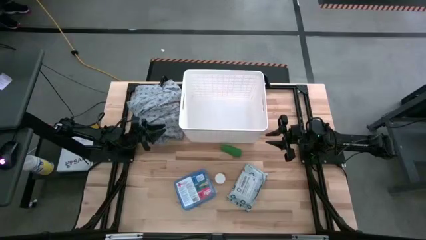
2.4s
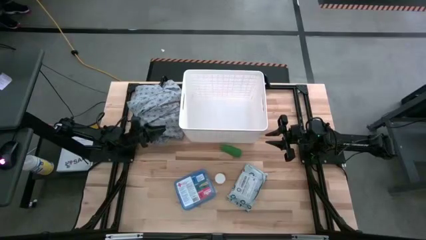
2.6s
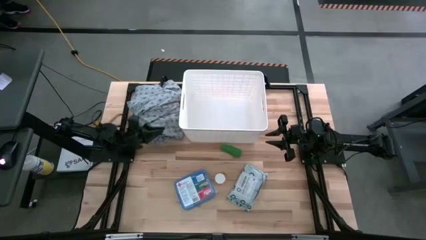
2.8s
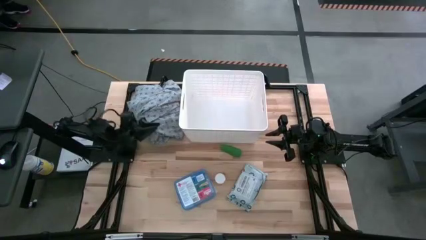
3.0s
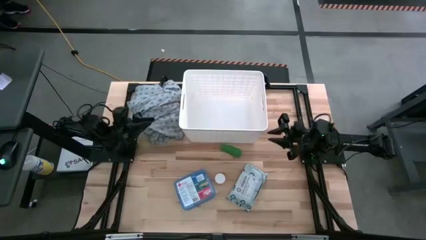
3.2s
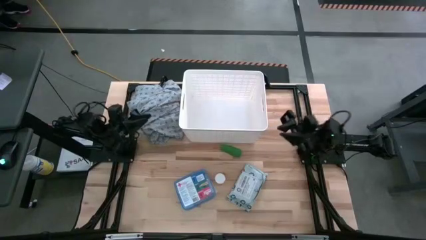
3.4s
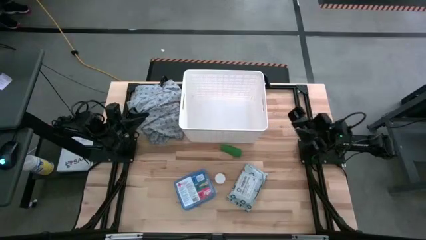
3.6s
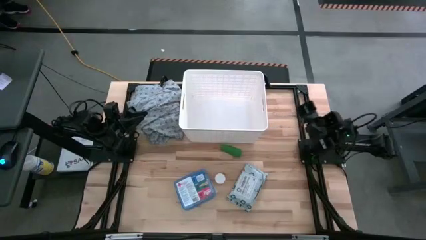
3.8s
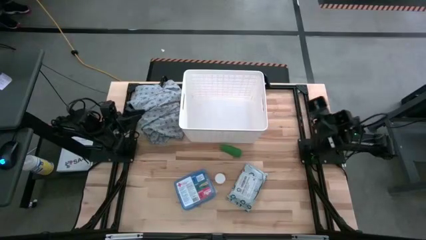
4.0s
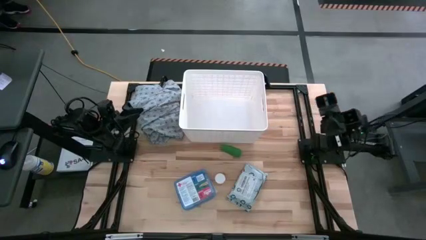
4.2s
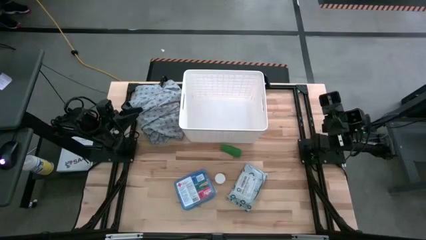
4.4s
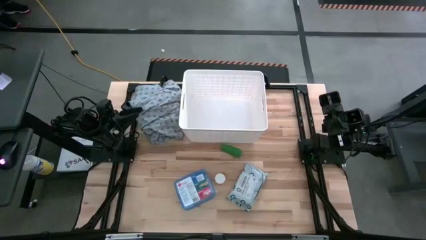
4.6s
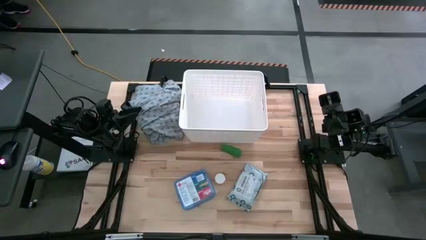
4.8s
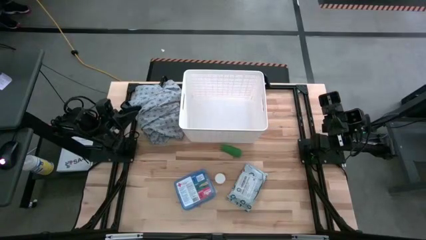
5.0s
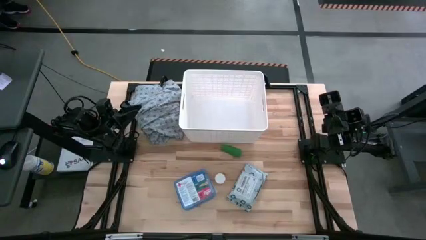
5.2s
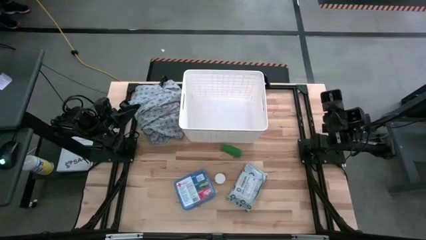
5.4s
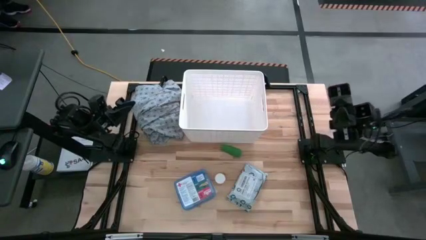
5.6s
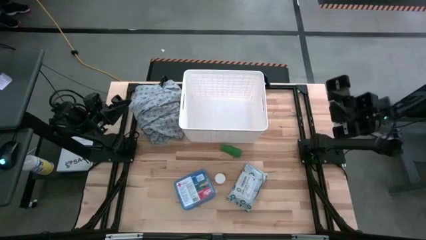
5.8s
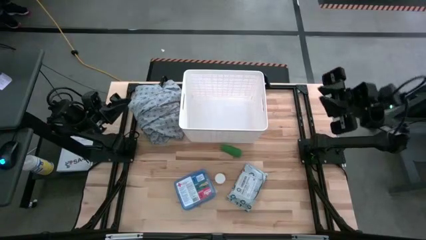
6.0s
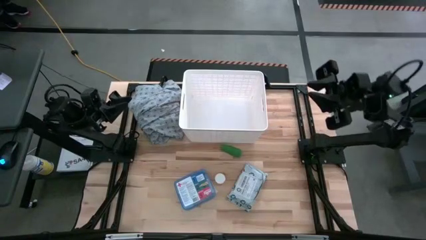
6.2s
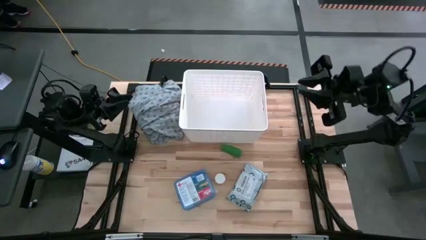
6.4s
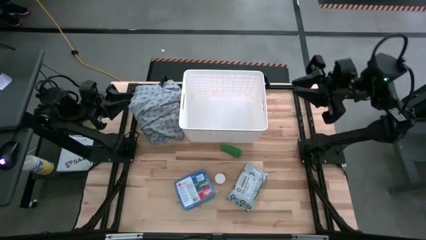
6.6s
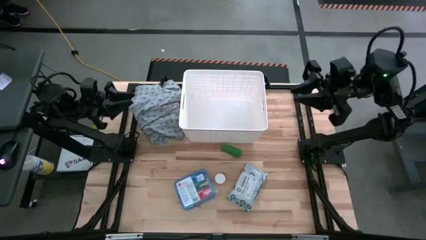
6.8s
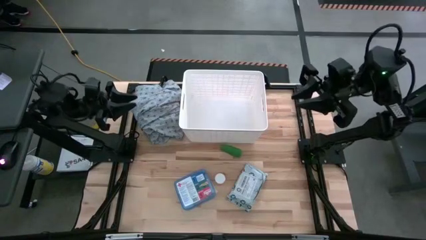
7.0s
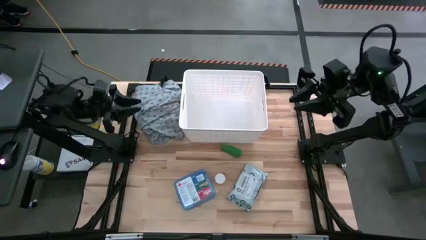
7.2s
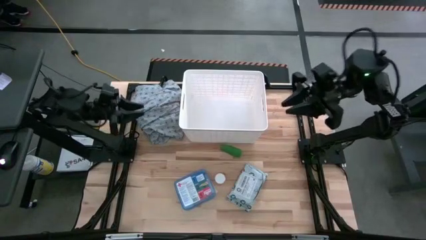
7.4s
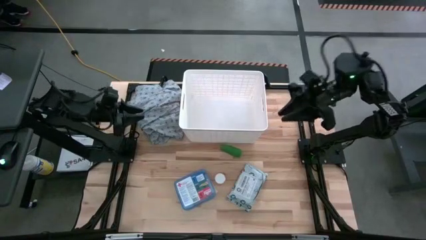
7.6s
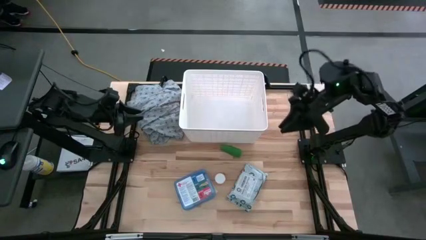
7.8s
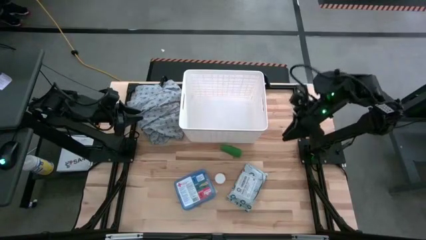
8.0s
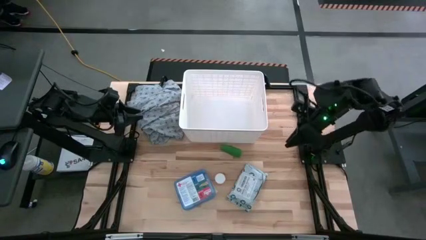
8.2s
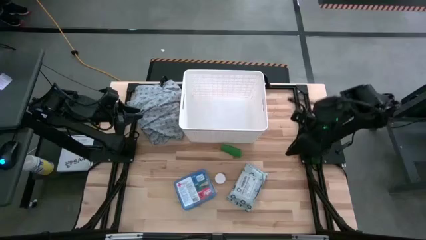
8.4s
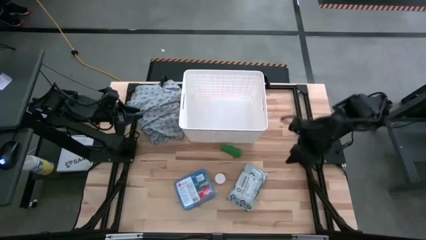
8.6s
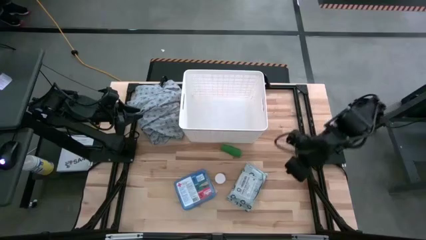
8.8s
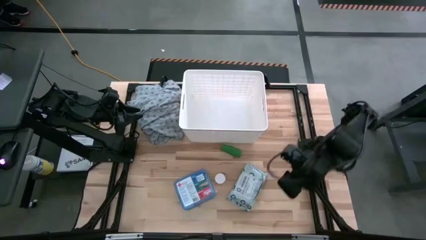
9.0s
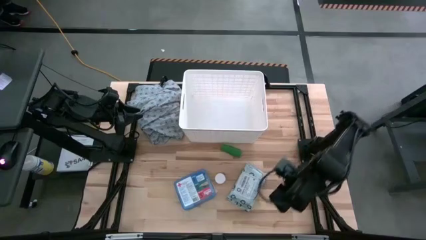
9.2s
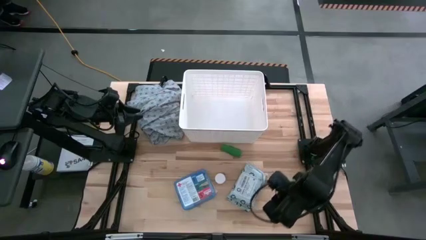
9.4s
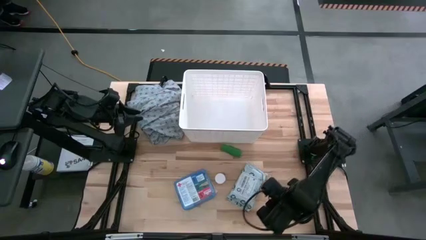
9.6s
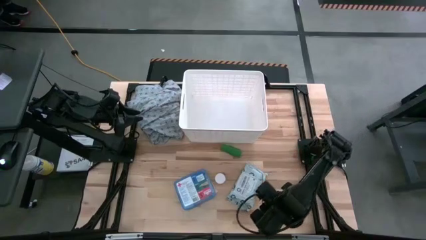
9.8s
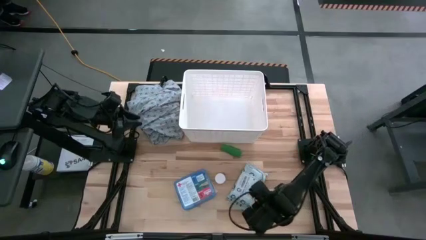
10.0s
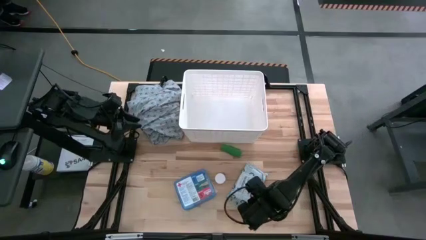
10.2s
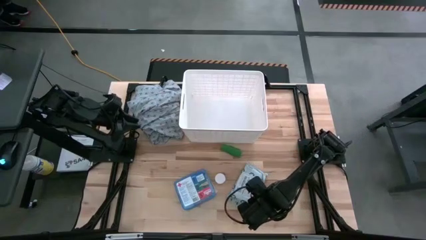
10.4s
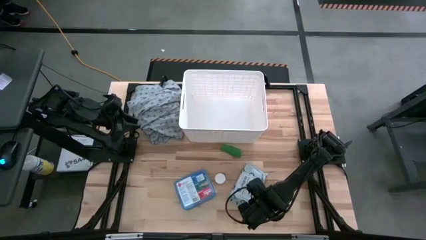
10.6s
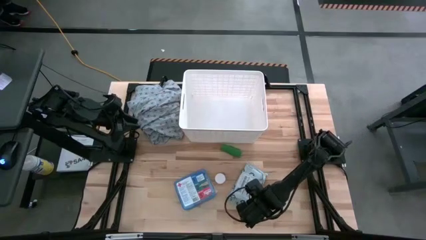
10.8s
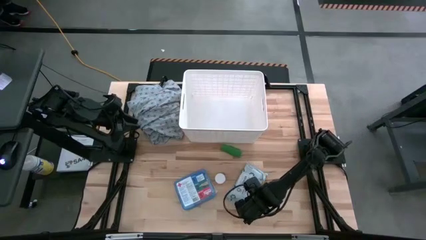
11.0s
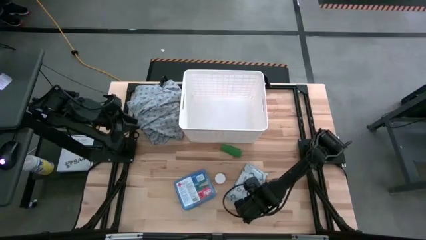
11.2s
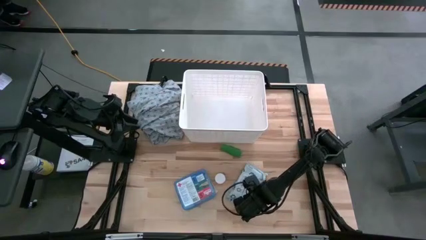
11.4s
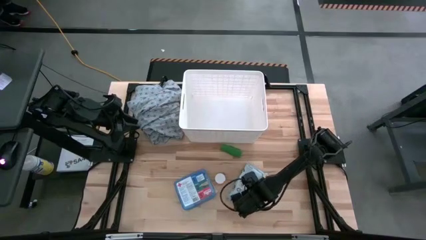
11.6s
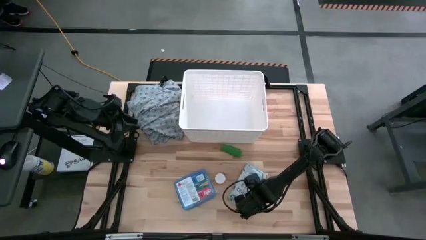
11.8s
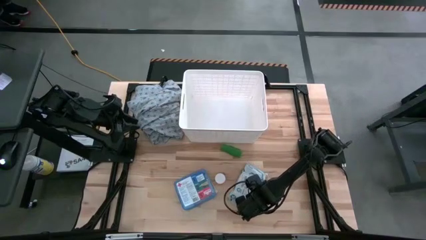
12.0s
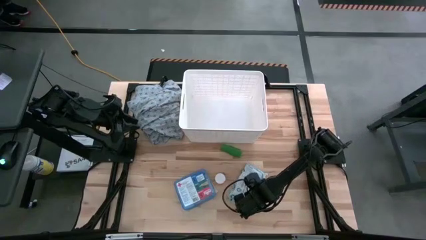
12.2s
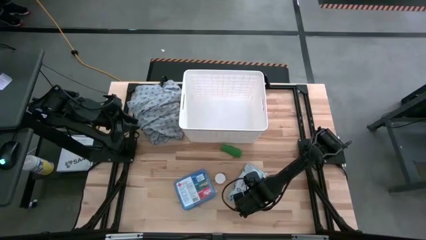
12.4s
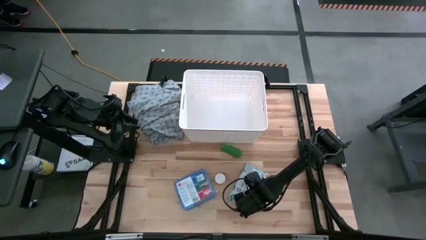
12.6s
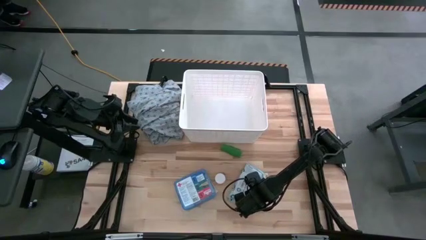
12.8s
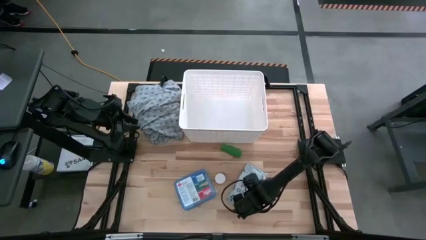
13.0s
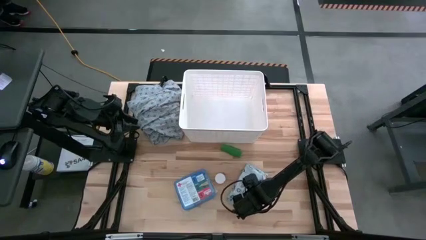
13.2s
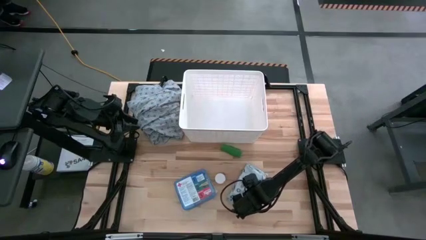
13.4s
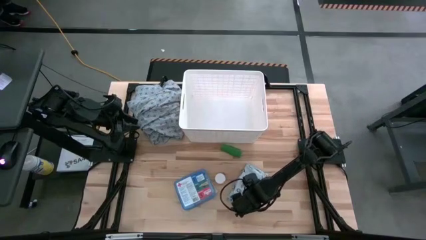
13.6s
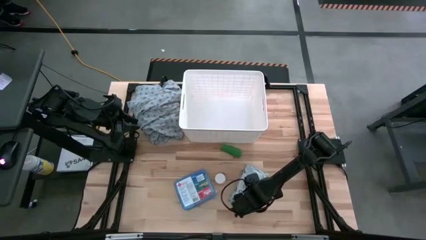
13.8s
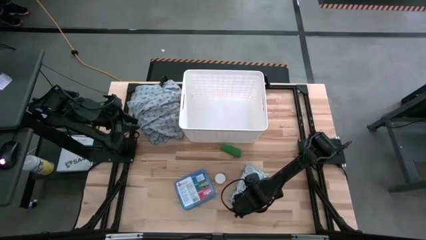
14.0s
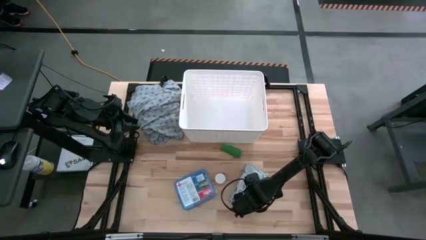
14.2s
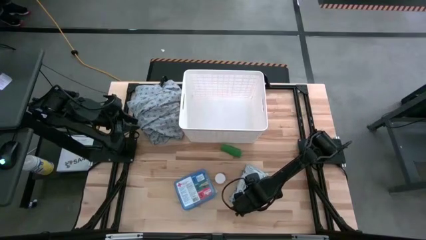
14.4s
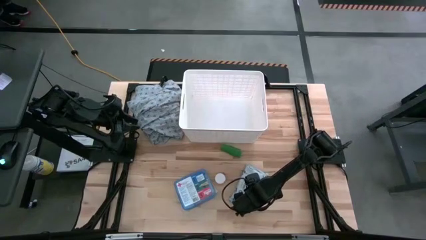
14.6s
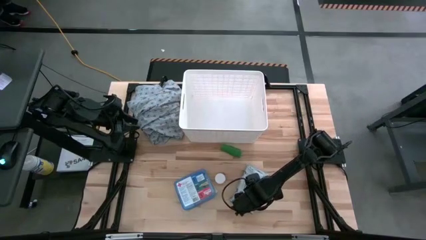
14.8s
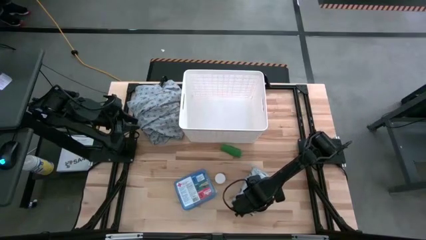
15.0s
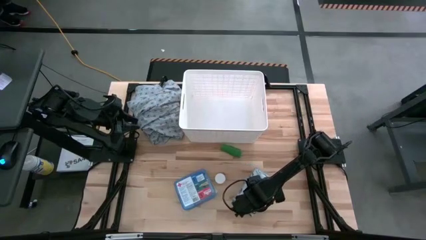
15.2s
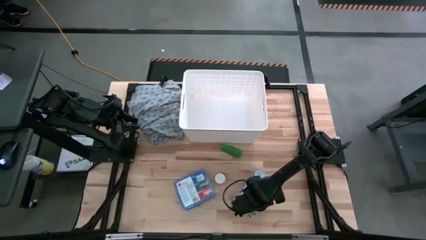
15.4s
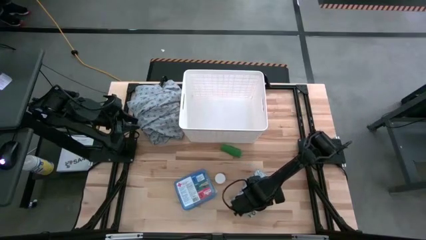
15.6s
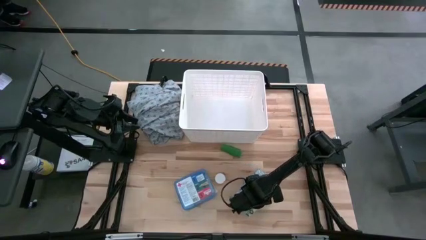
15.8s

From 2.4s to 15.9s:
Task: Pick & place medical supplies in basket/bin
Put the blue mailer bag into the white bin

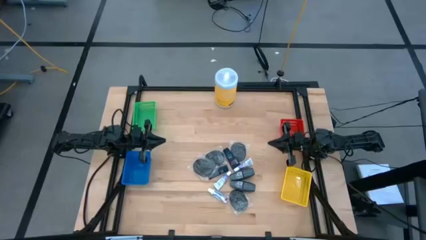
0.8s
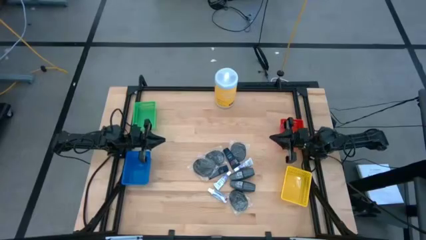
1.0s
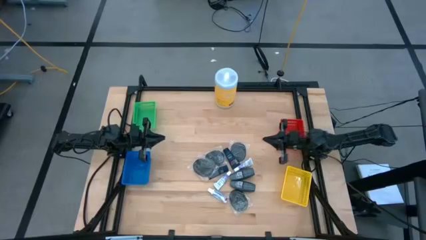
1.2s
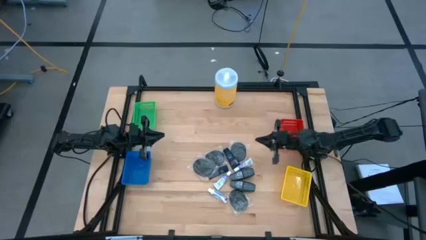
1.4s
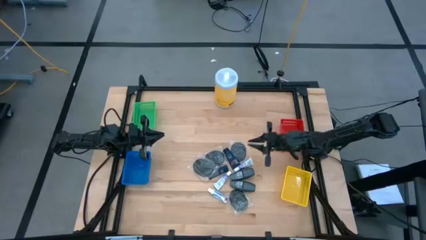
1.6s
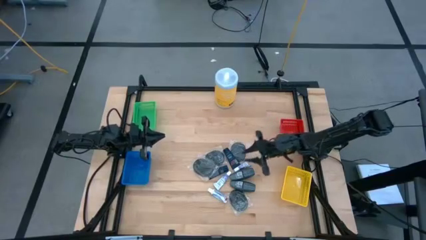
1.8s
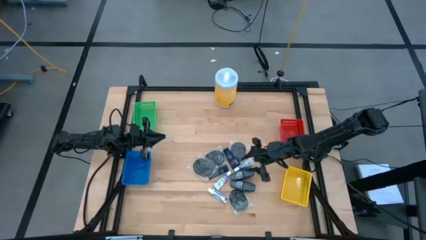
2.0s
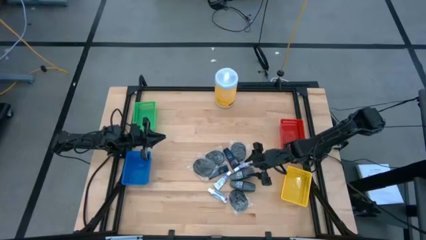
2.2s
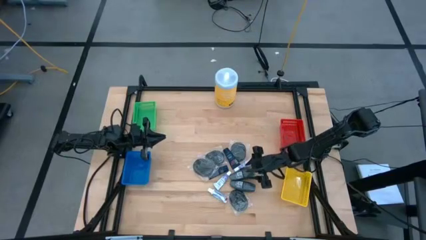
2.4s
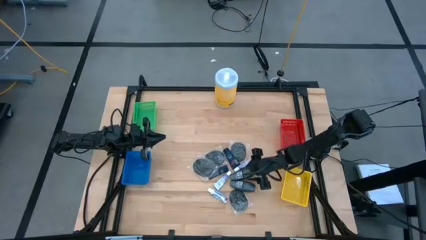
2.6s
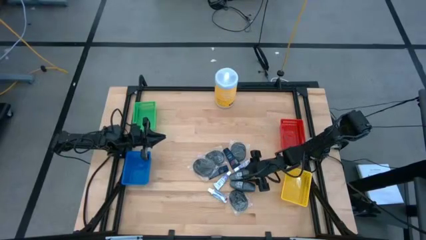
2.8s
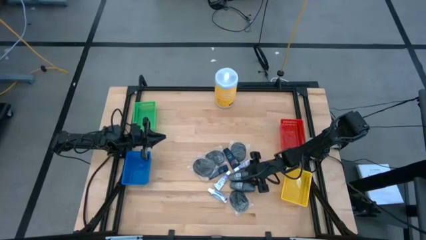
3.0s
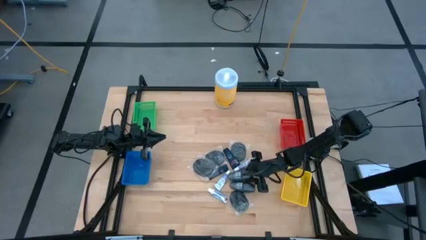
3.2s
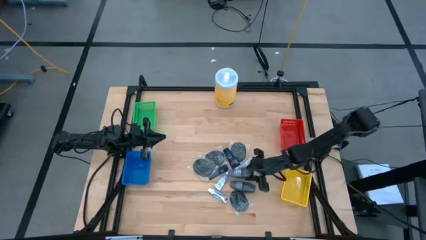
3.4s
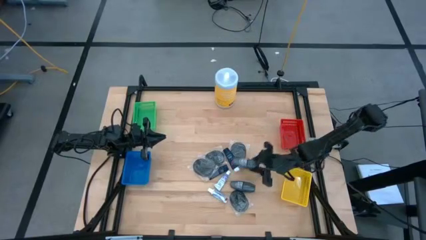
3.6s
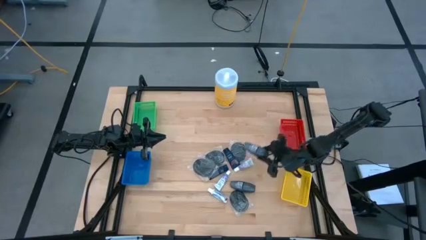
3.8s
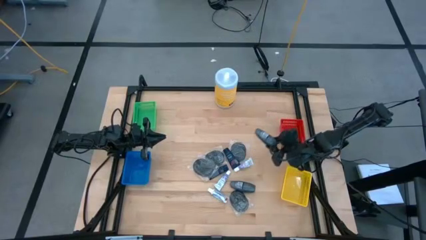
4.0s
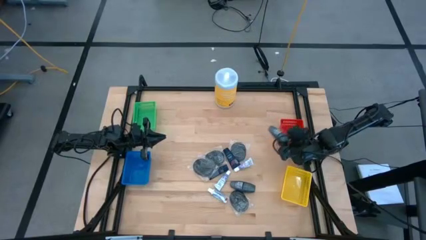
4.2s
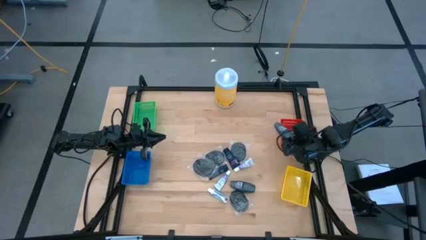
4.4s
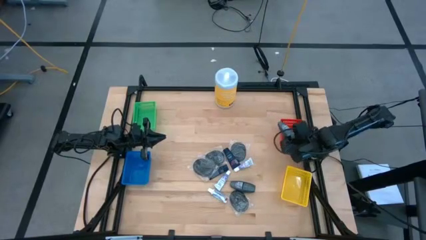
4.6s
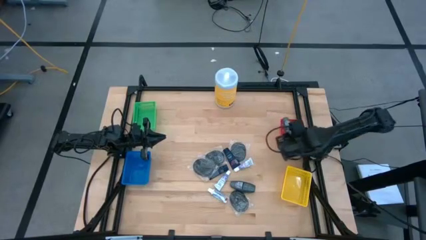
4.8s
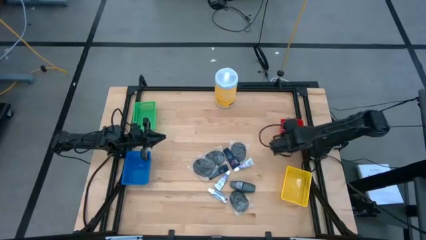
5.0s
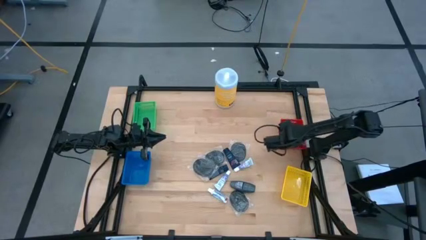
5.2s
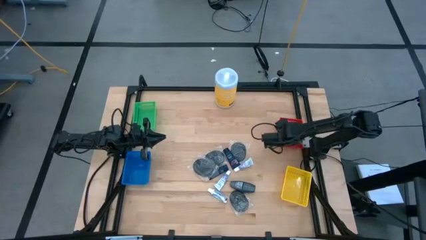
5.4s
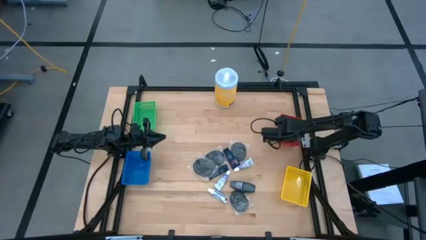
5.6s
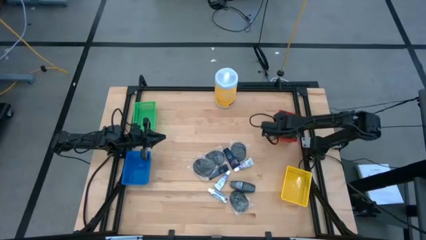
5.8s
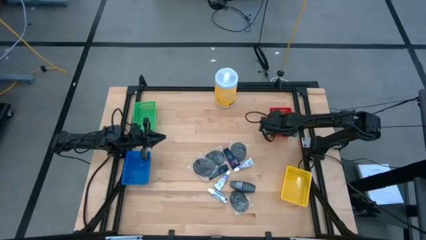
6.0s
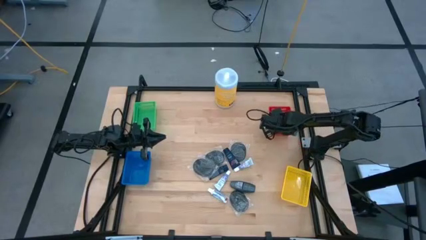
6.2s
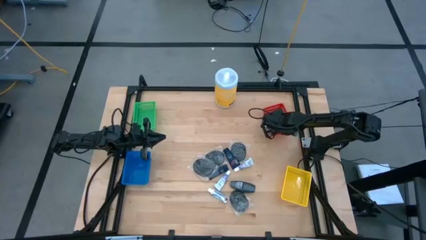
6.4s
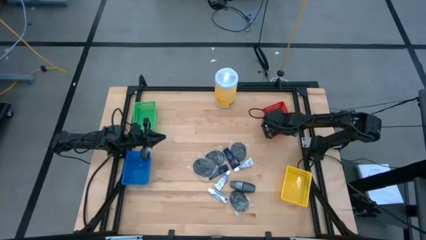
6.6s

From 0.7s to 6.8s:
Task: Pick & Place Travel size toiletries
Put the deodorant into the red bin
